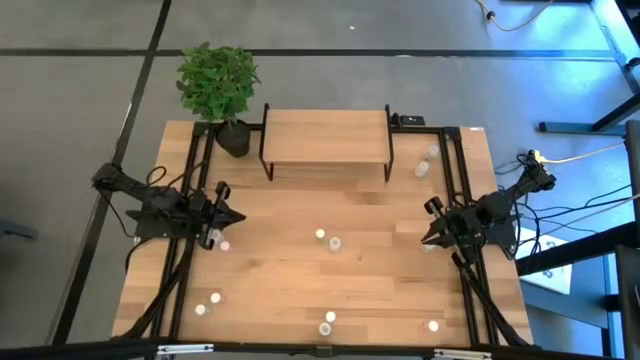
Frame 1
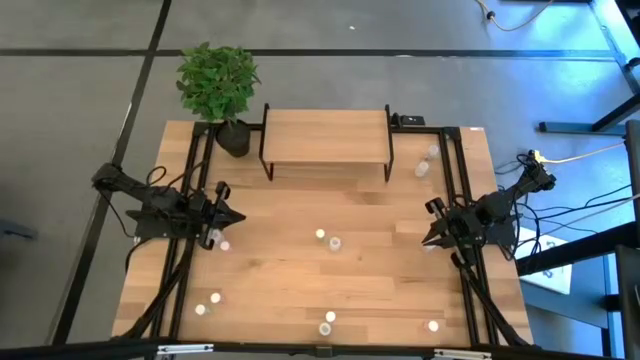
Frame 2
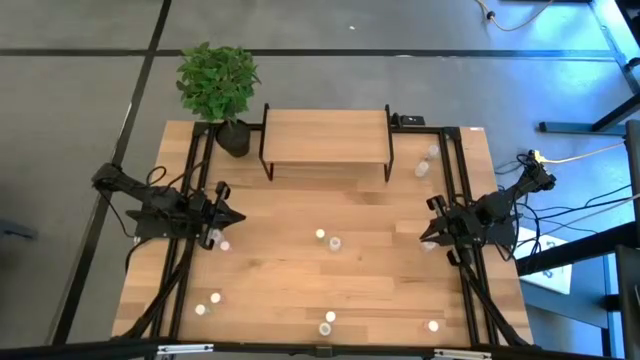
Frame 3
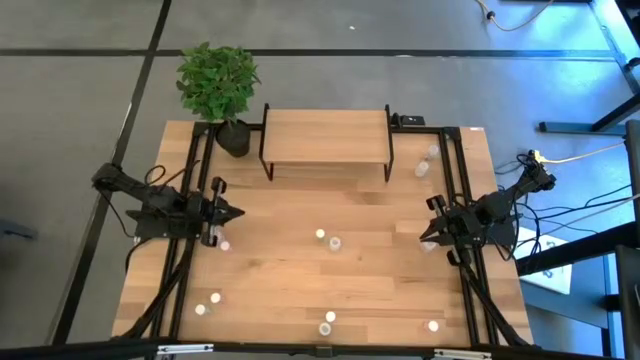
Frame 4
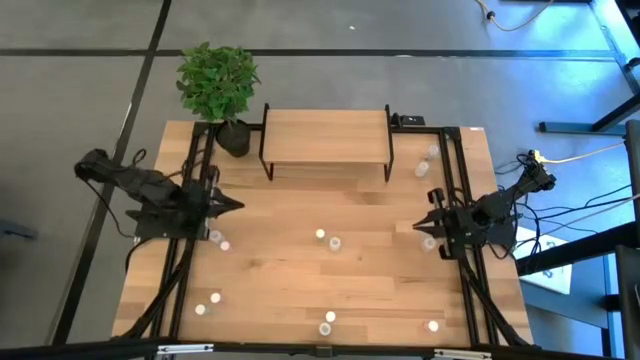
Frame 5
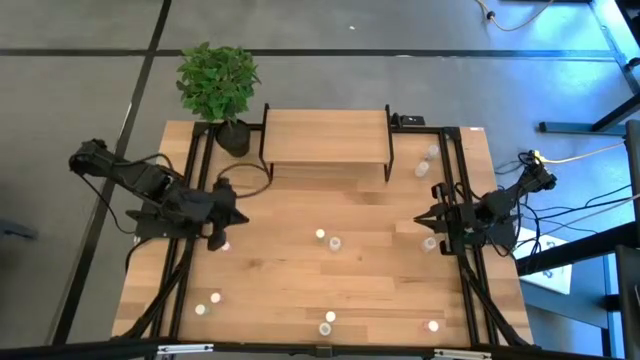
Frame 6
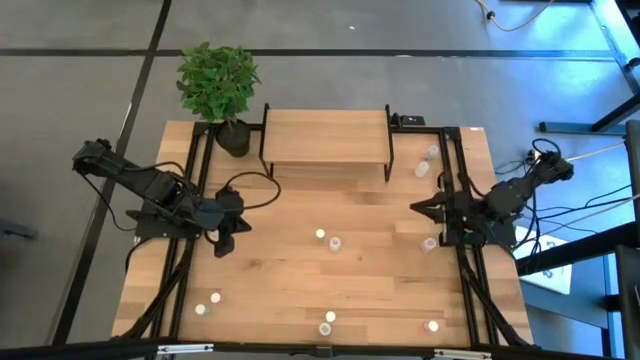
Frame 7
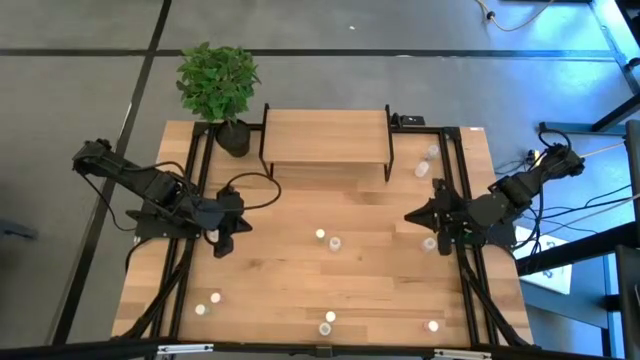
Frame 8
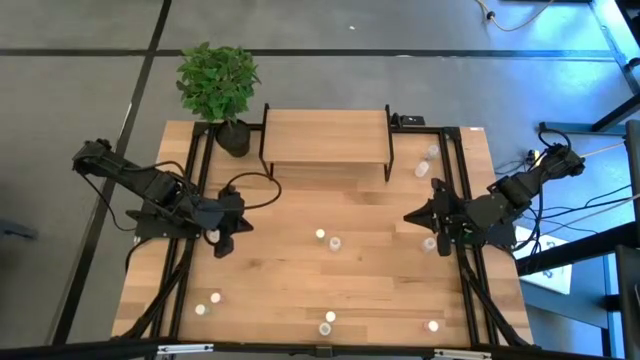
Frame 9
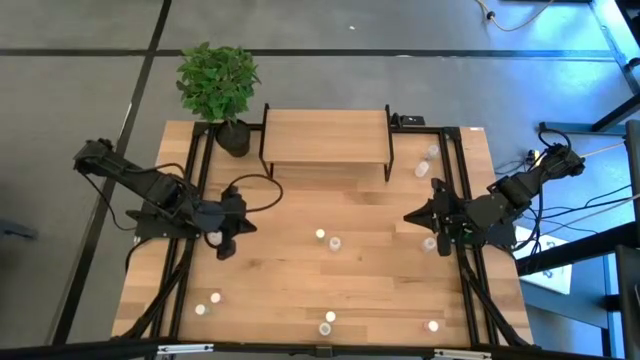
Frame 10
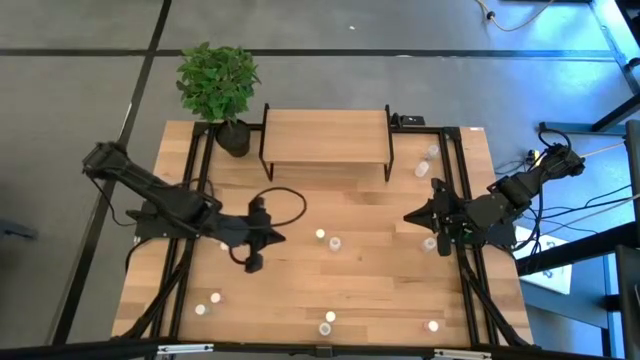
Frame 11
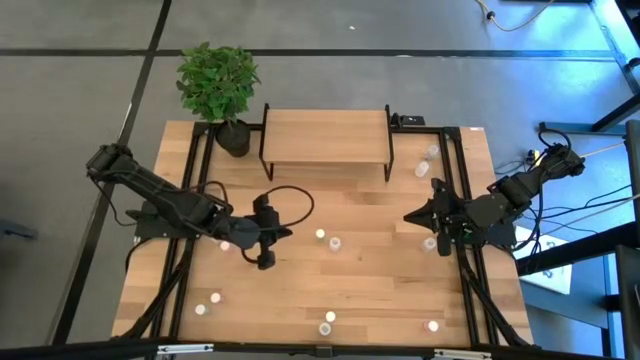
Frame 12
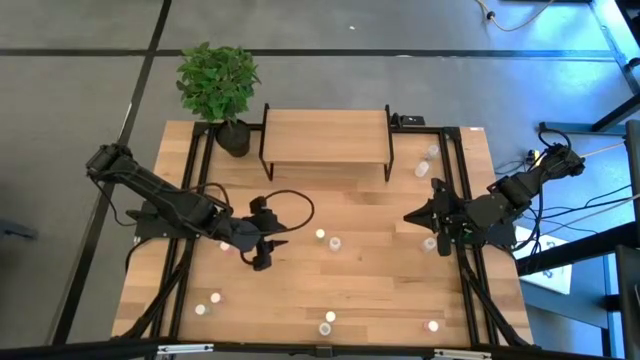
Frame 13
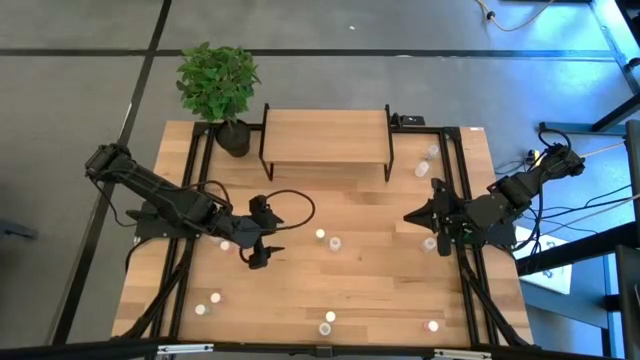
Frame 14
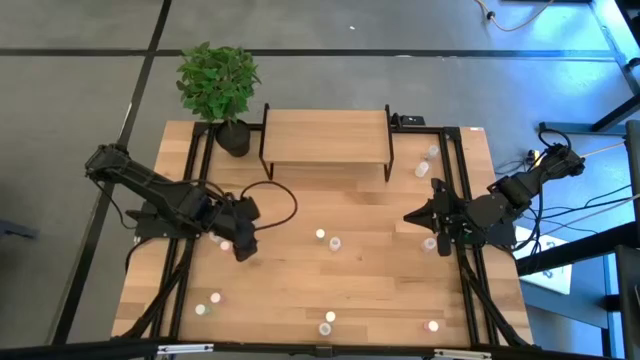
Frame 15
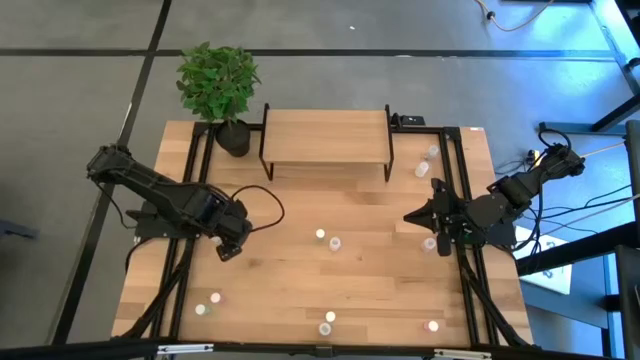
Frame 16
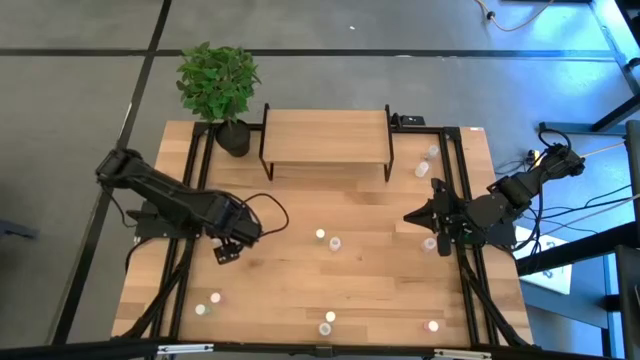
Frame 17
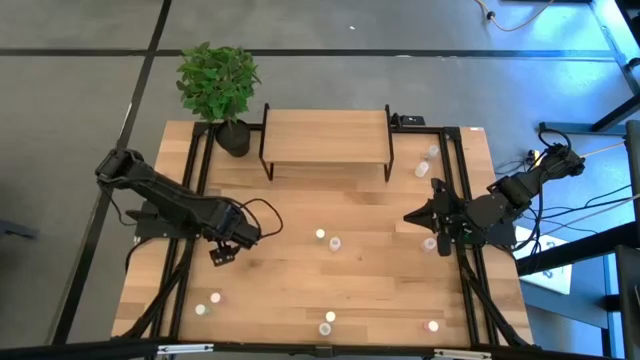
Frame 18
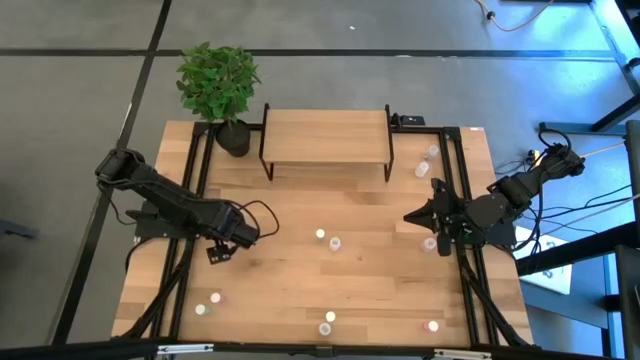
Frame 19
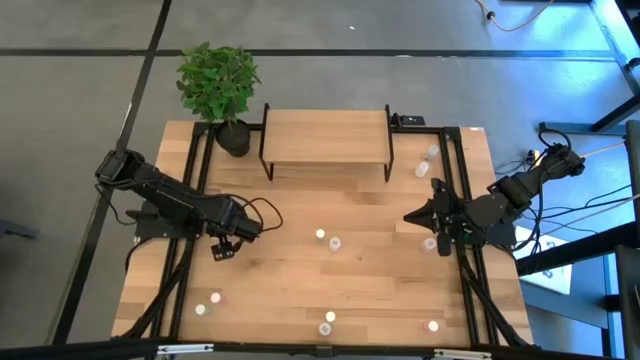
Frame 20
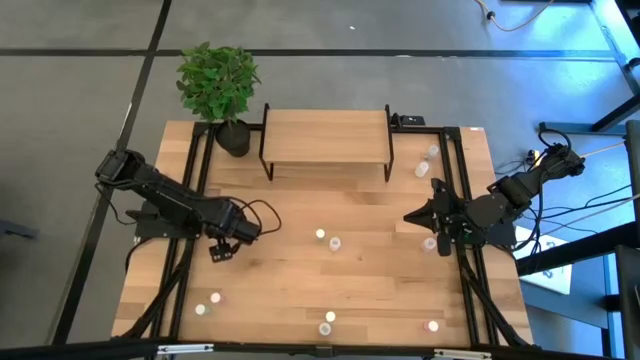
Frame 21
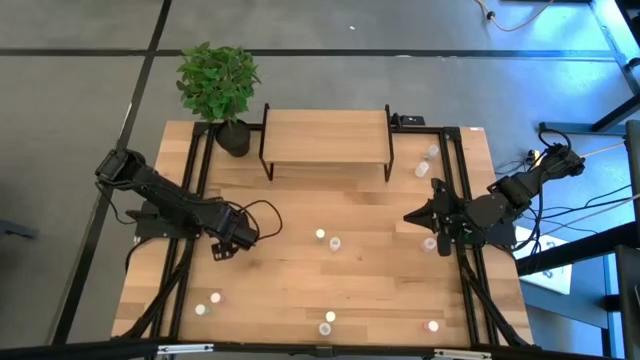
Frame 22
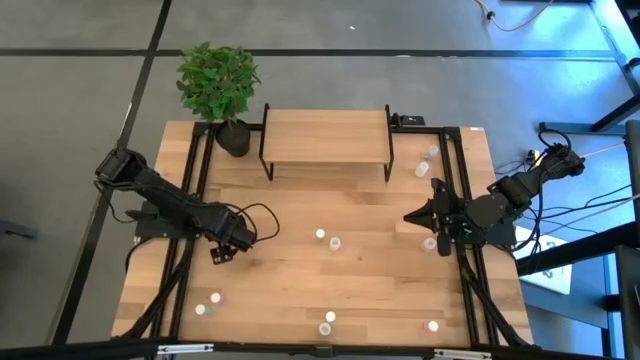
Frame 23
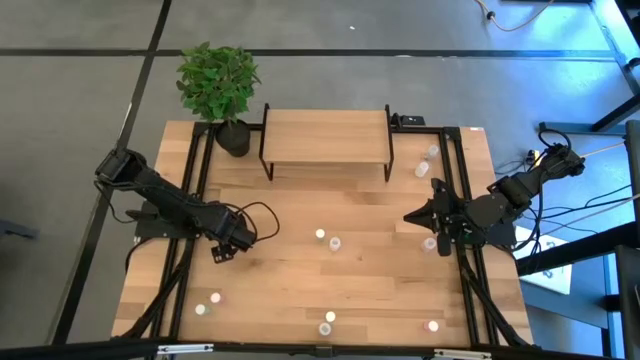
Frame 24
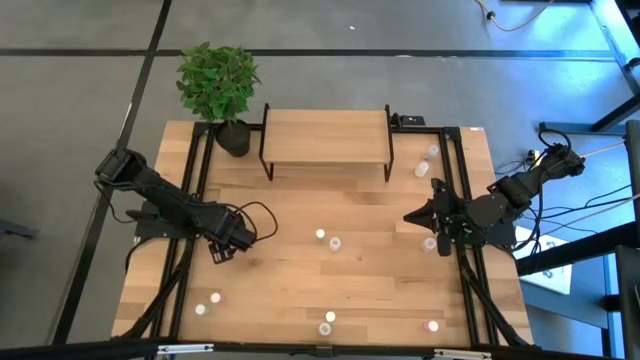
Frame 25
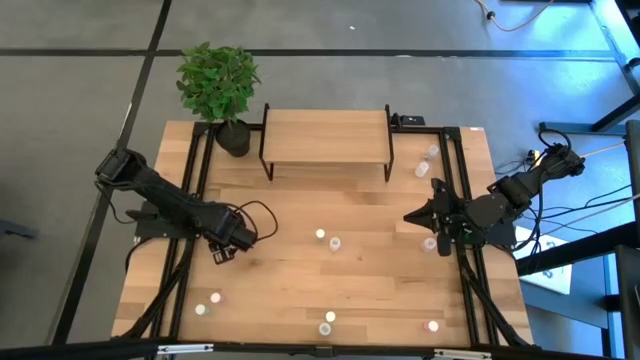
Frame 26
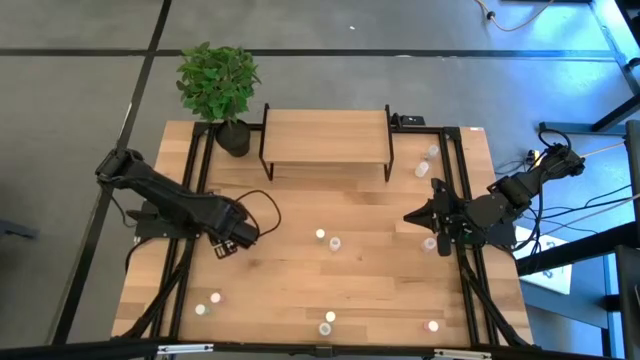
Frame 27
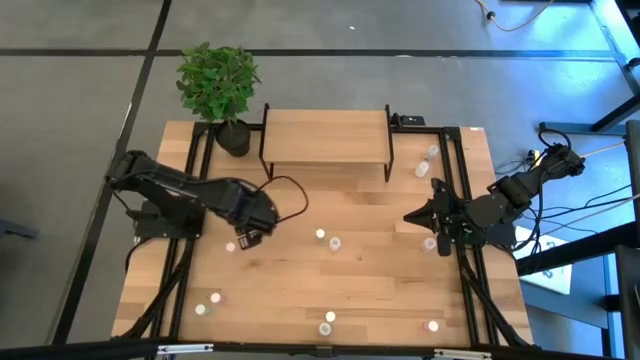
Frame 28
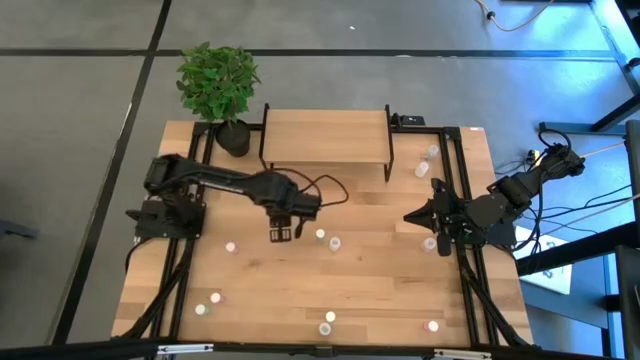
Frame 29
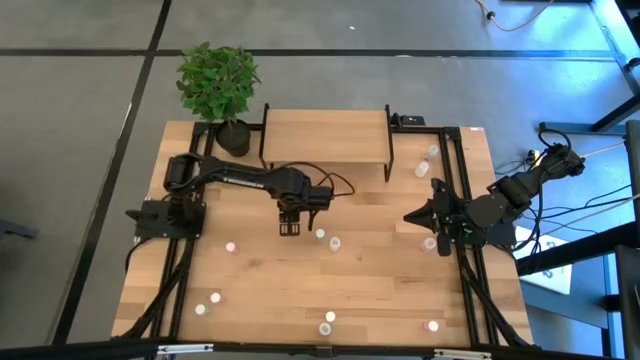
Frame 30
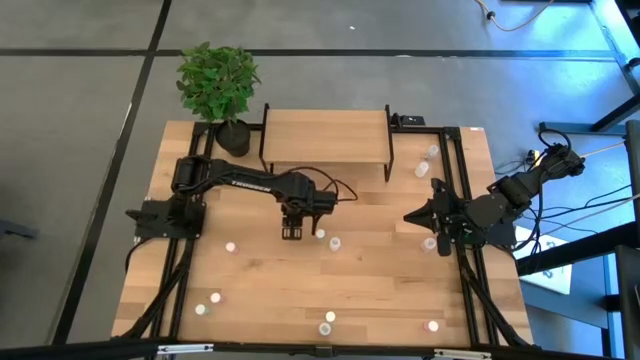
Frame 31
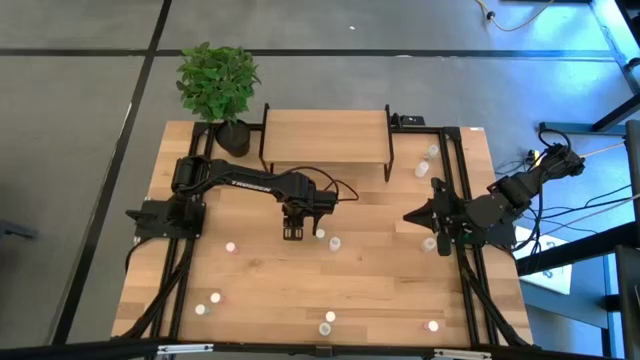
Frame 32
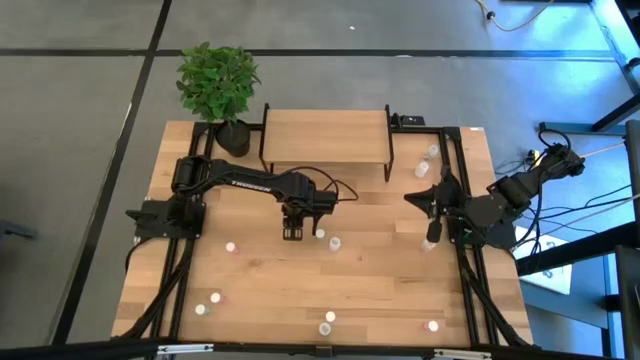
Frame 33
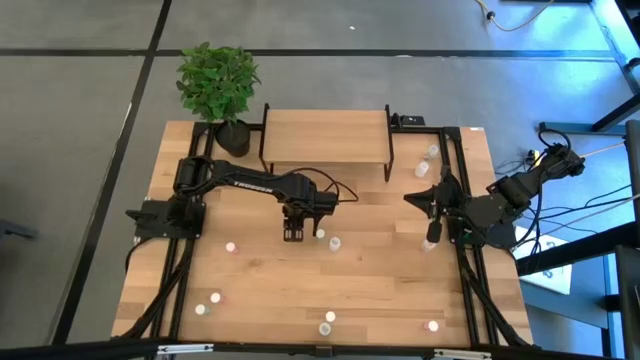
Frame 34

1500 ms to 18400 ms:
Task: Pick and place medicine bottles onto shelf by color
Put the middle left transparent pill bottle on the shelf
